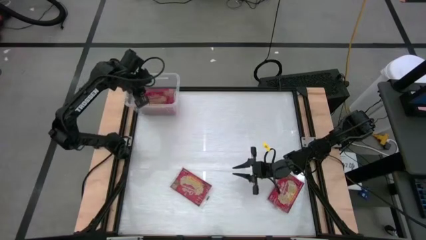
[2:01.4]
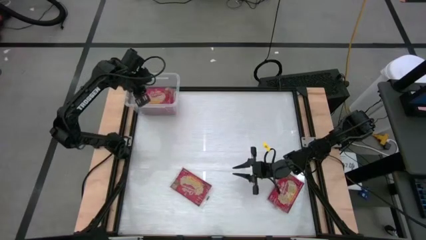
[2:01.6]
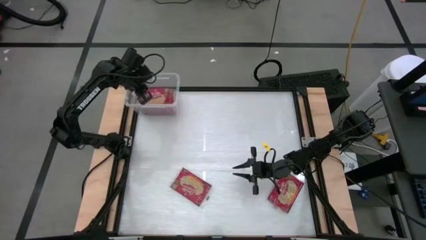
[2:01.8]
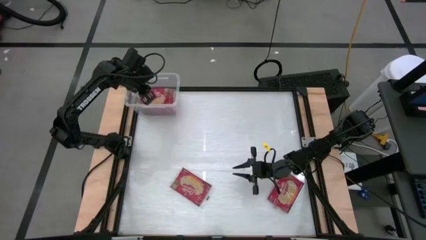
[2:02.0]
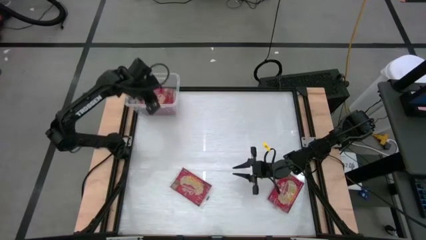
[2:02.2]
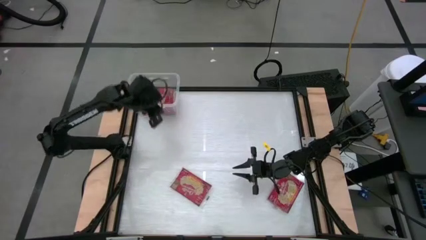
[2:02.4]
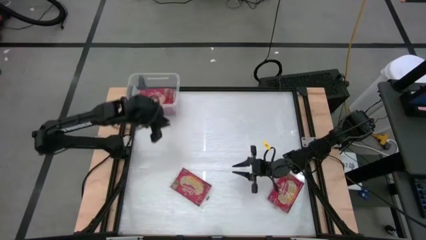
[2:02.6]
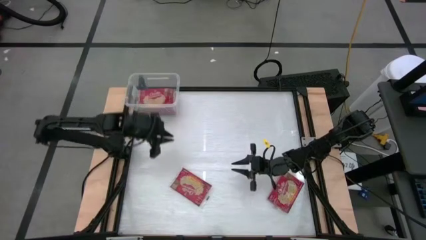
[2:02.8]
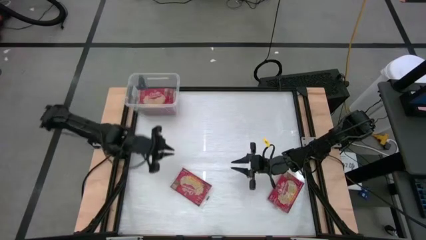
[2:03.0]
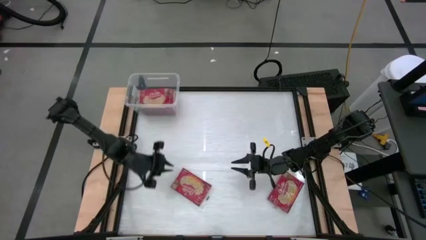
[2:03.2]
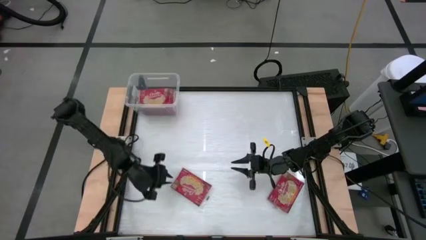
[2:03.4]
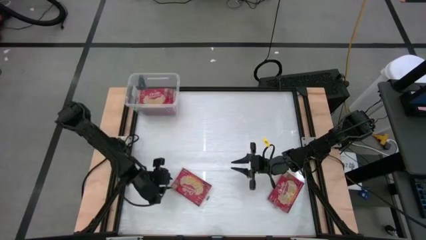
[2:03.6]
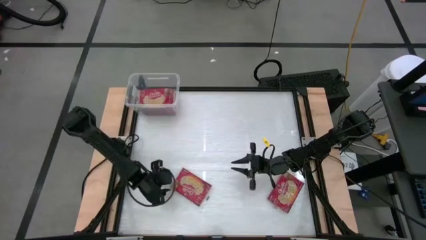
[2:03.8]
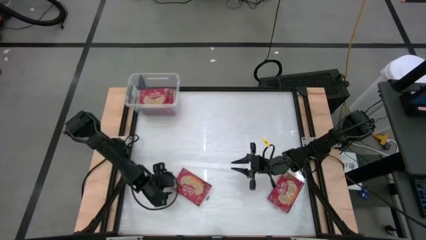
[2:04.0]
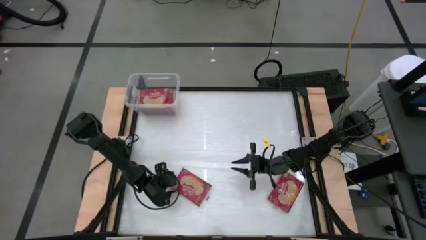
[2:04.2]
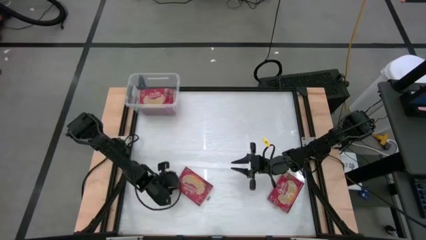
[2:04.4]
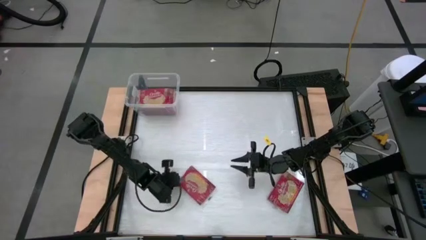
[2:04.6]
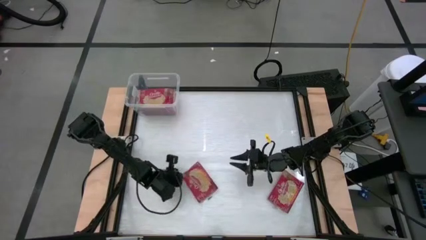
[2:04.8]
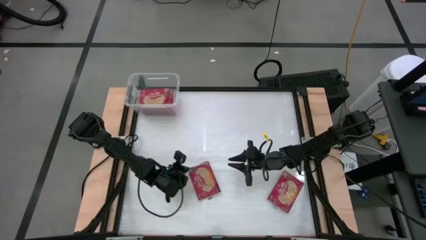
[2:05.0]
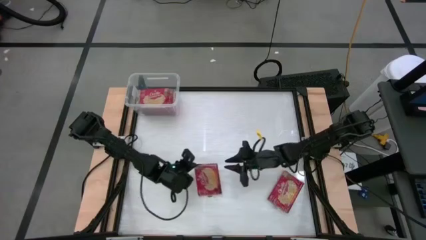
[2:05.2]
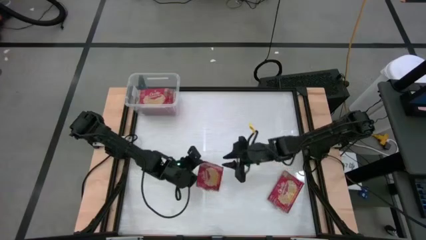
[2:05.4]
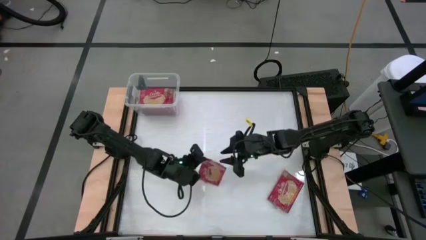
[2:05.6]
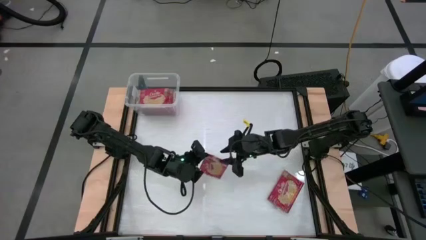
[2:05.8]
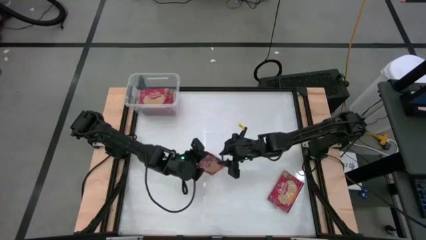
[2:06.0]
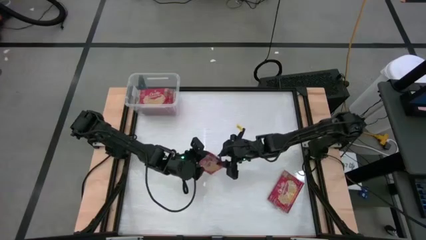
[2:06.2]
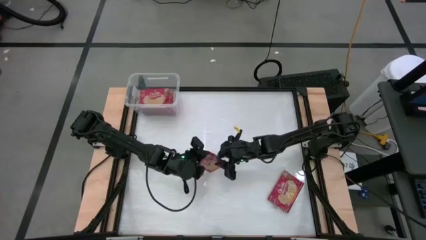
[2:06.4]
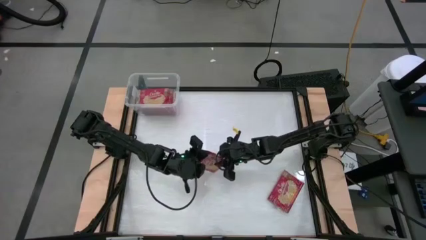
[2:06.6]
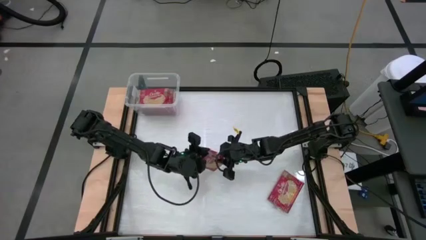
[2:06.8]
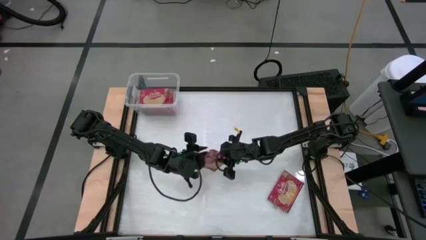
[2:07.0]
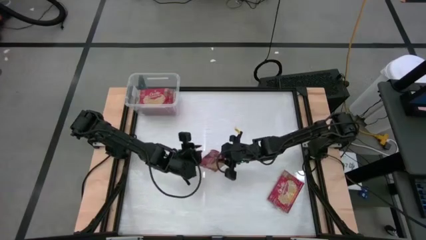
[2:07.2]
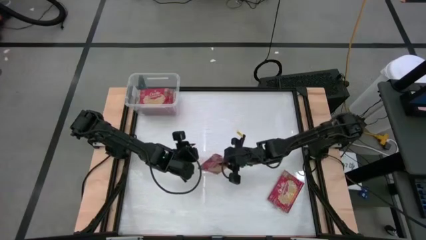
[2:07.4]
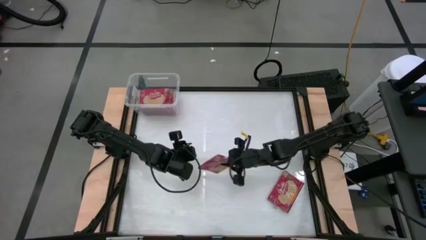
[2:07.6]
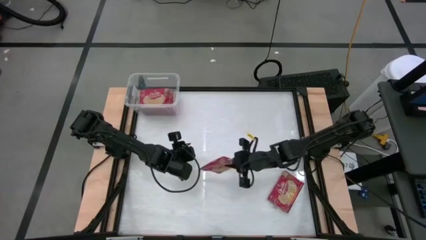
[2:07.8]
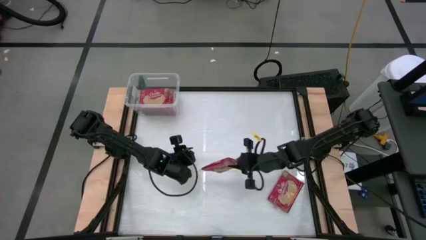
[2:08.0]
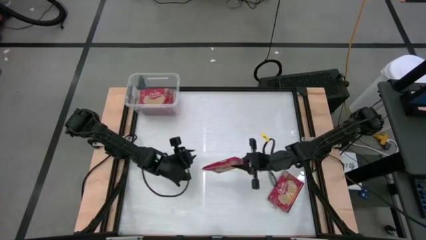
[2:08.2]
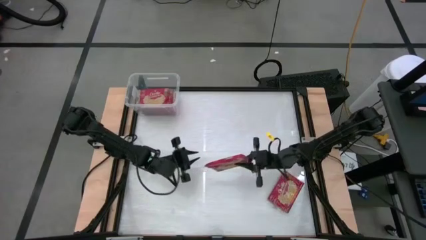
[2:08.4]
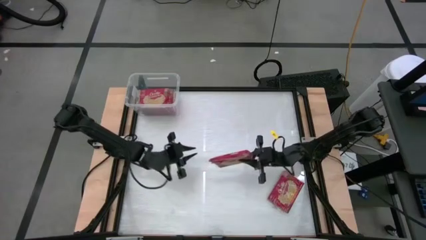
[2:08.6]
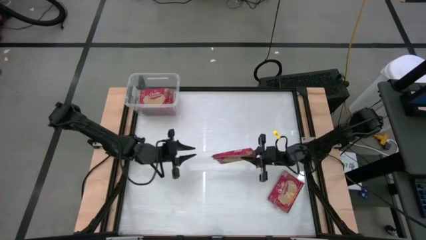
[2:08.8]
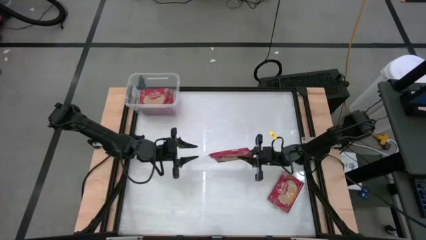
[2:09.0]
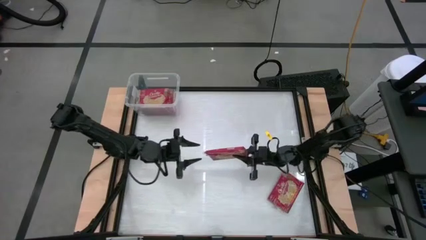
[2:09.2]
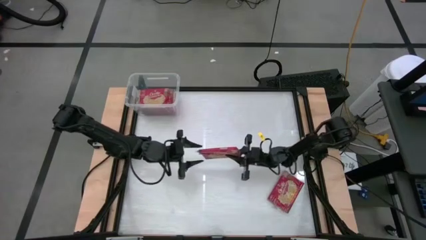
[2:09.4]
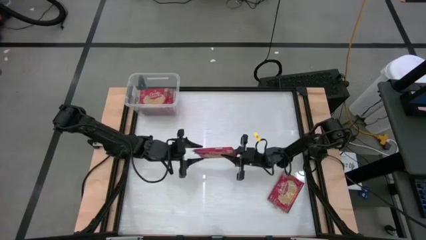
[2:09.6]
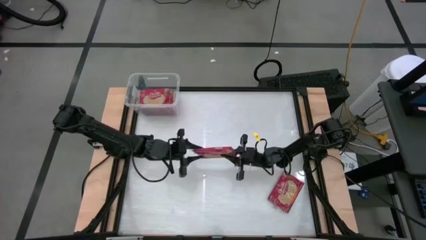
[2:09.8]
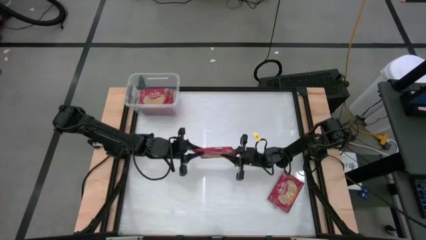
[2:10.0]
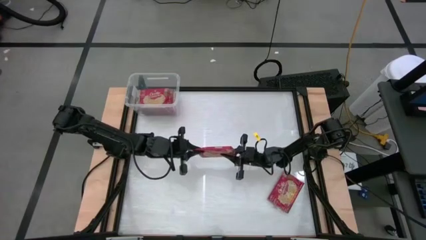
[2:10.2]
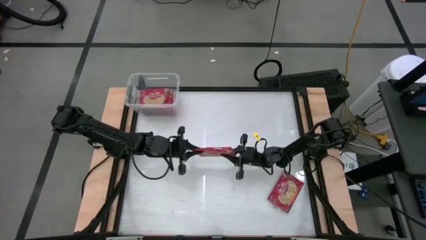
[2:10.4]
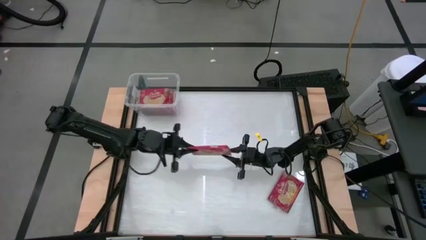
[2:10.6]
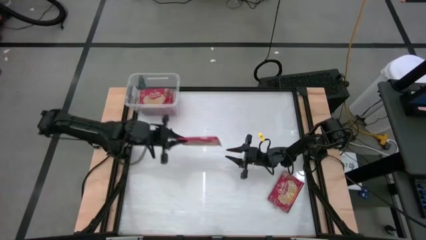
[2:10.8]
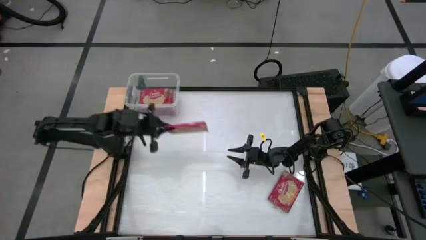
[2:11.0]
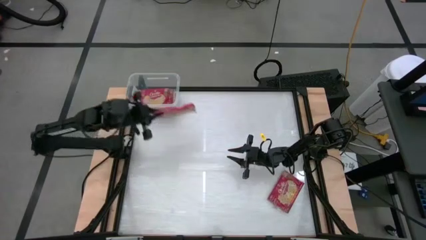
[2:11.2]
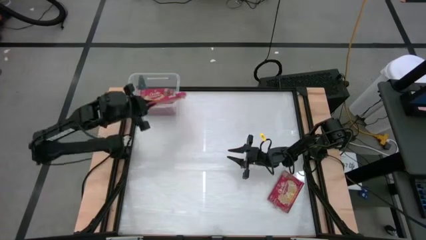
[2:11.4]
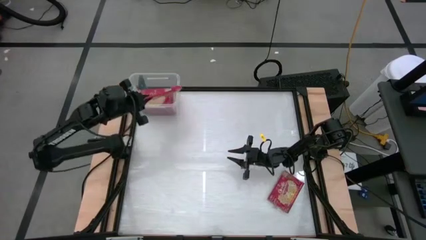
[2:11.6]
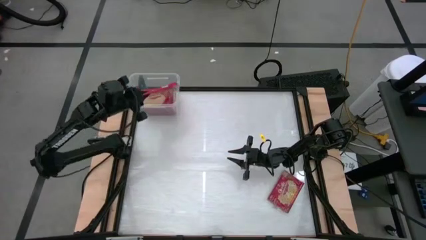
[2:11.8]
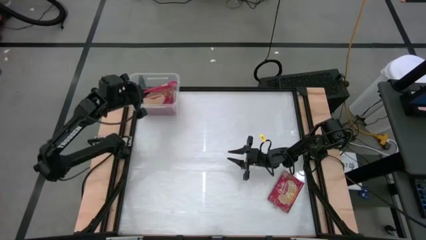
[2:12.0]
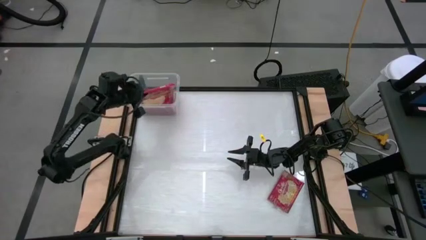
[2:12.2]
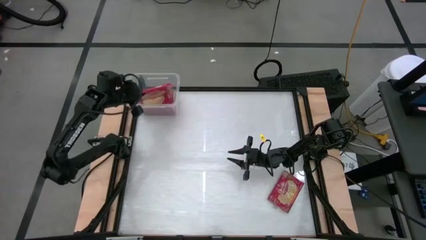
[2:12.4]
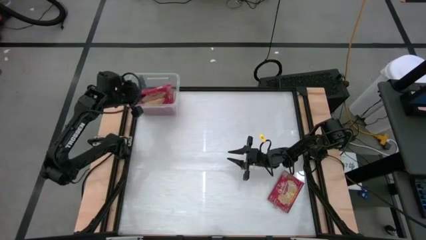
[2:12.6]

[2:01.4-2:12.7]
Task: Sort popcorn bags into baskets
Put the red popcorn bag into the transparent container

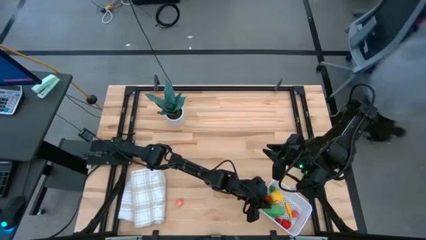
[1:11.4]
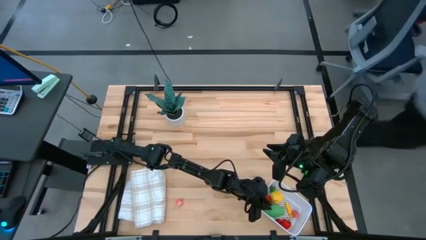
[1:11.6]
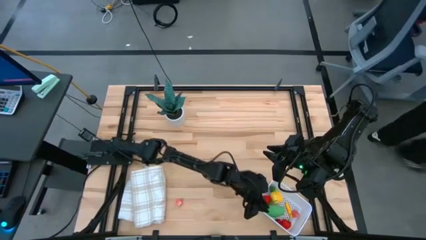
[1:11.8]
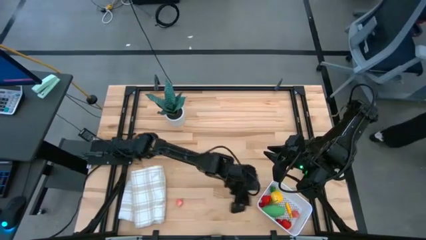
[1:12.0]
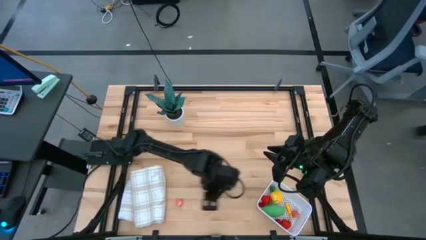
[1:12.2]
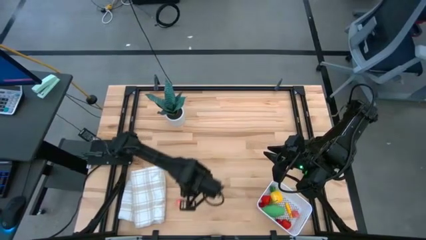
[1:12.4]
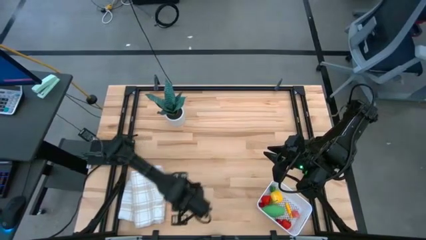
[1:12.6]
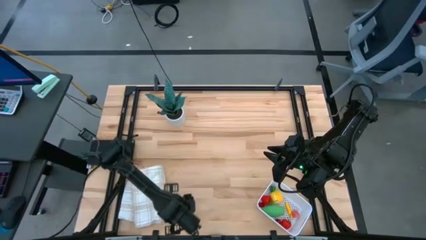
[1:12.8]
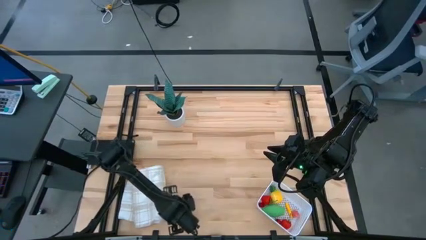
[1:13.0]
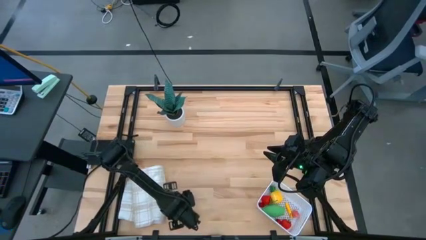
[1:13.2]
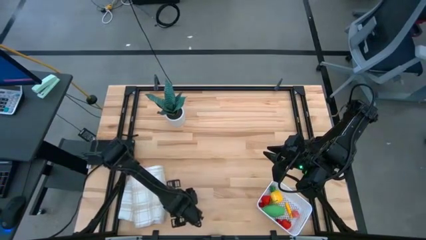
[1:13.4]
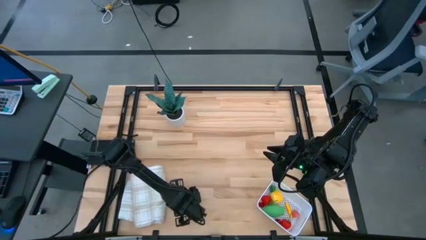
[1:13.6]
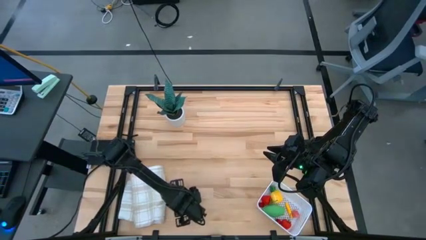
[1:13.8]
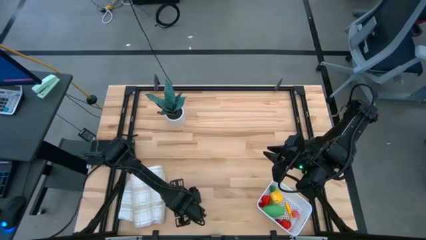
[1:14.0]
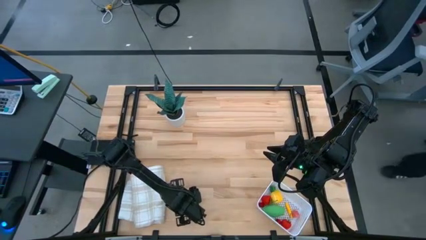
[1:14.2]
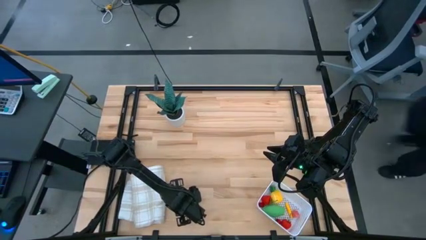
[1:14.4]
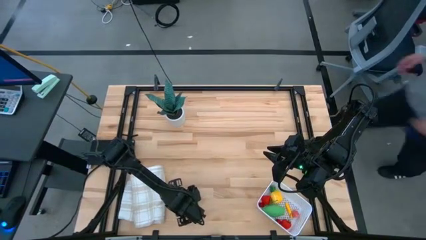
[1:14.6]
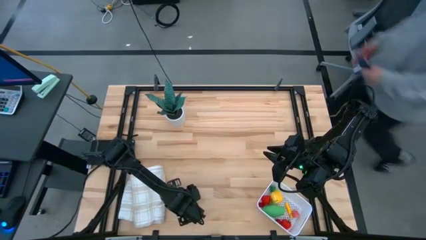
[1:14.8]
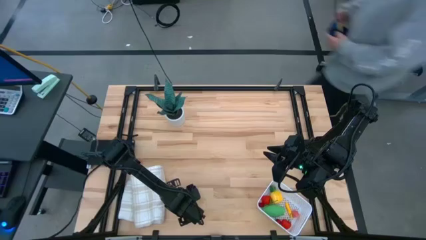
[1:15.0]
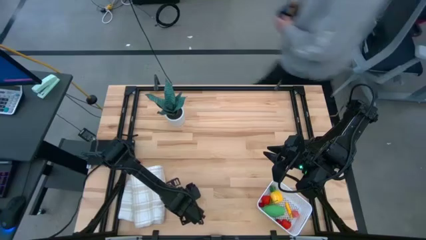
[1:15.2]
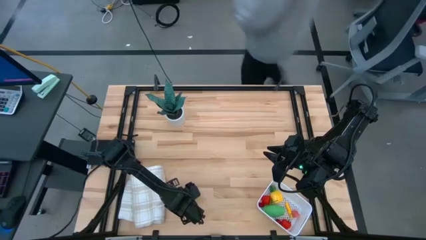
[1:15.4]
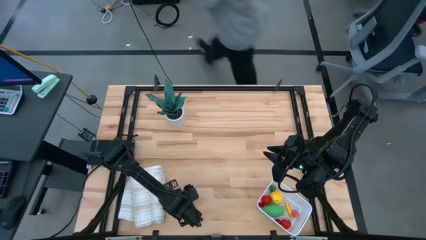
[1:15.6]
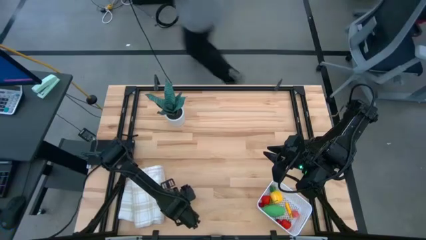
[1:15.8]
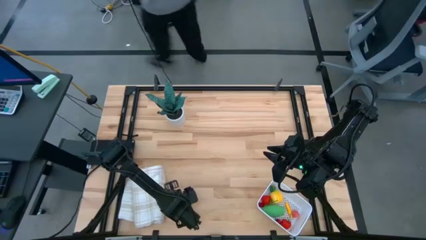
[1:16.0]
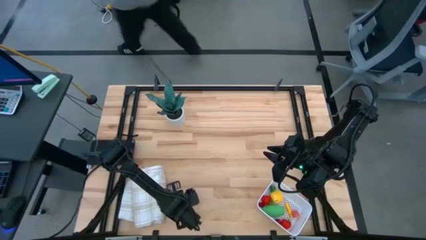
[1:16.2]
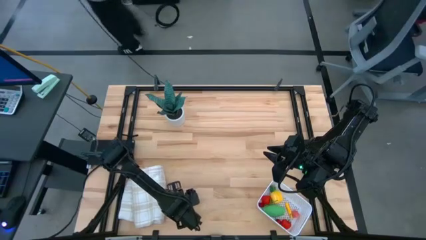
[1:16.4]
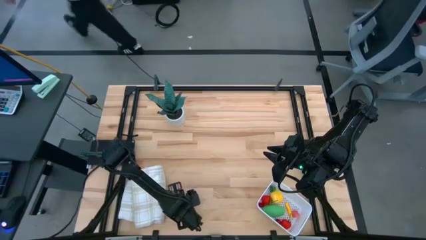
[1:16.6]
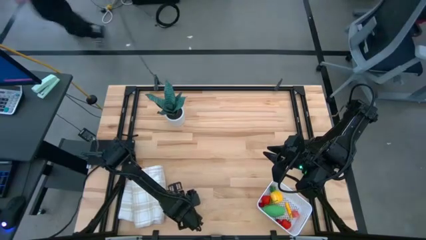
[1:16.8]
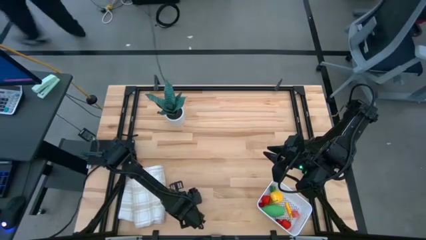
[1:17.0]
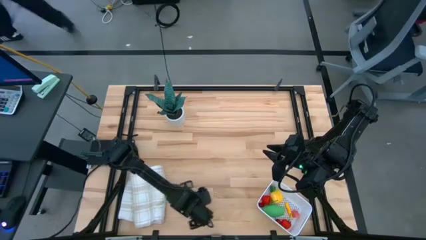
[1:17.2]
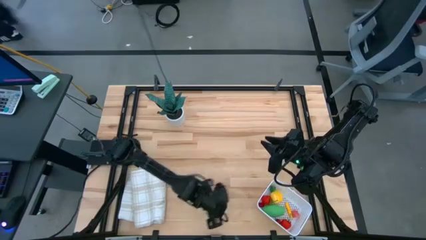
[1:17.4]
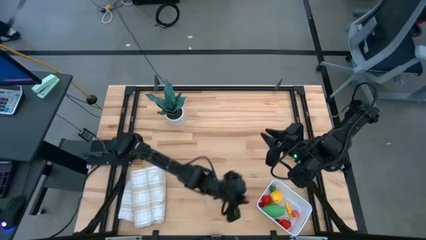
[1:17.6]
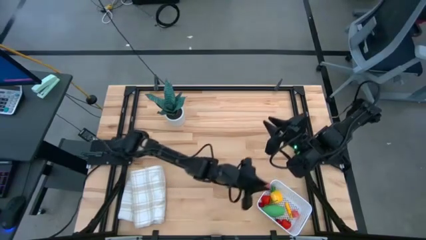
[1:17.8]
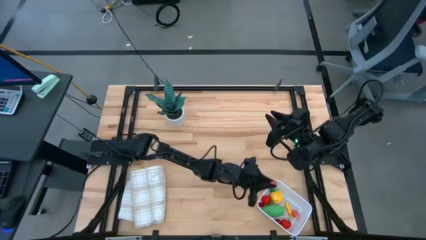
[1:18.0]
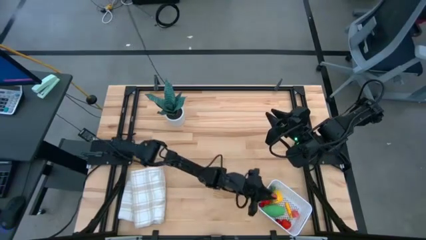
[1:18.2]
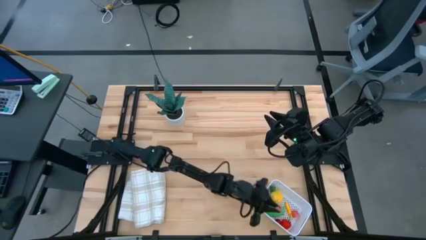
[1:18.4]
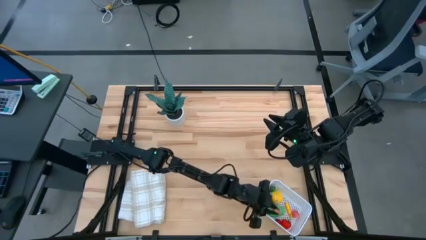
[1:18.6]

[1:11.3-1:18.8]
Task: Pick and placing Produce into tupperware
Put the pink peach into the white bin
